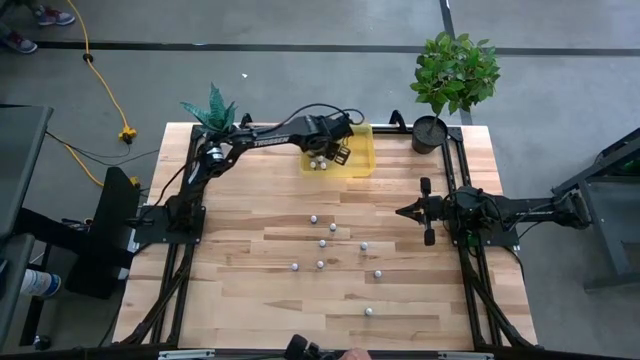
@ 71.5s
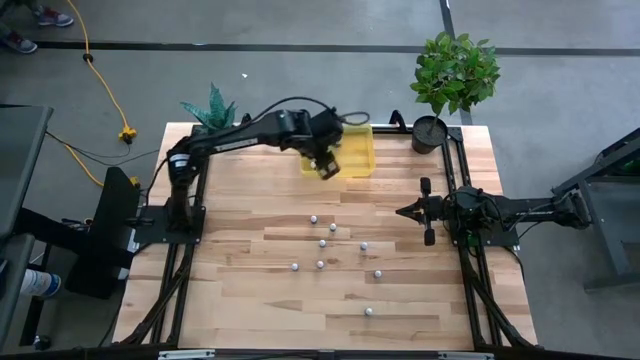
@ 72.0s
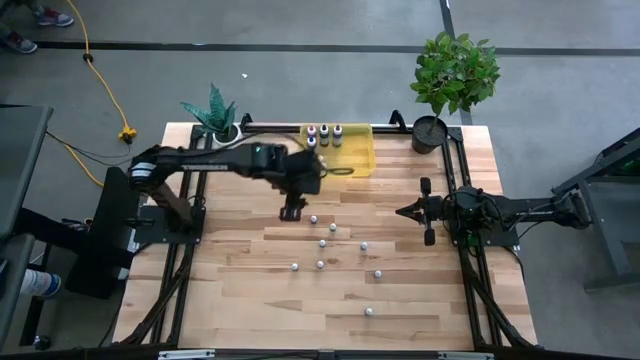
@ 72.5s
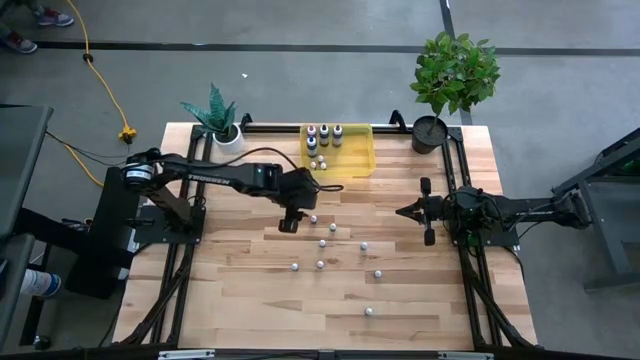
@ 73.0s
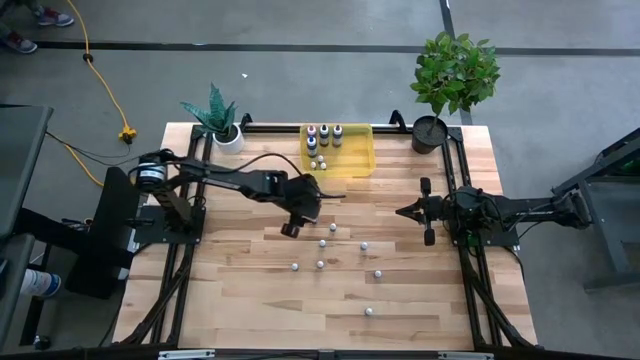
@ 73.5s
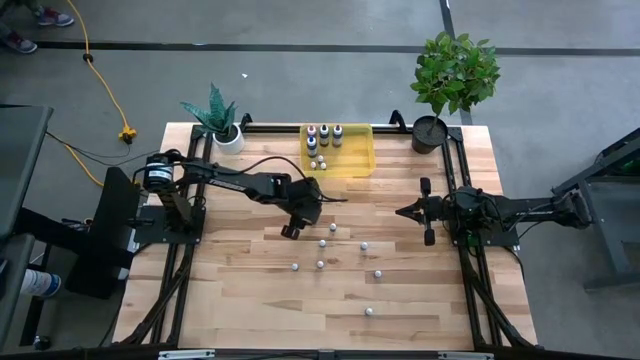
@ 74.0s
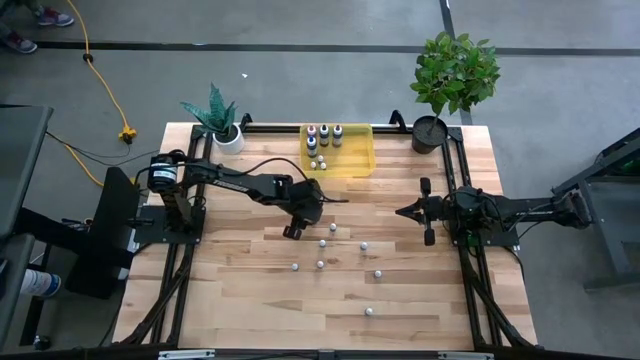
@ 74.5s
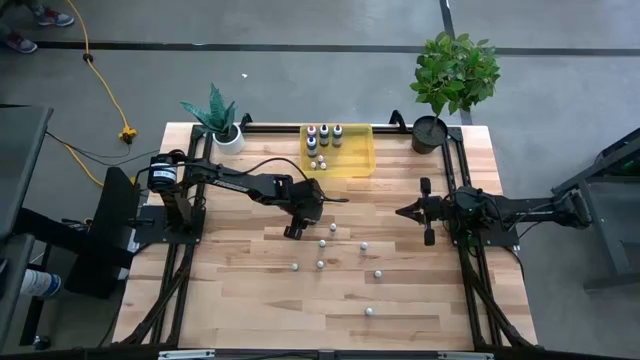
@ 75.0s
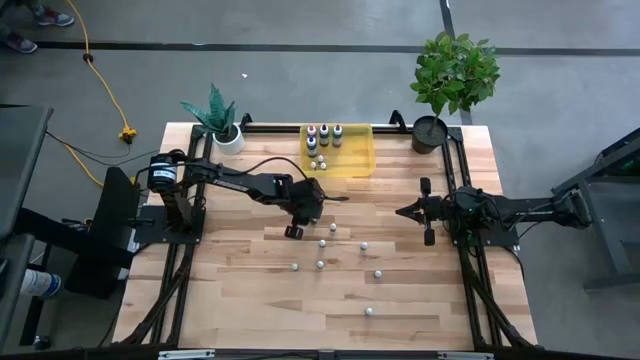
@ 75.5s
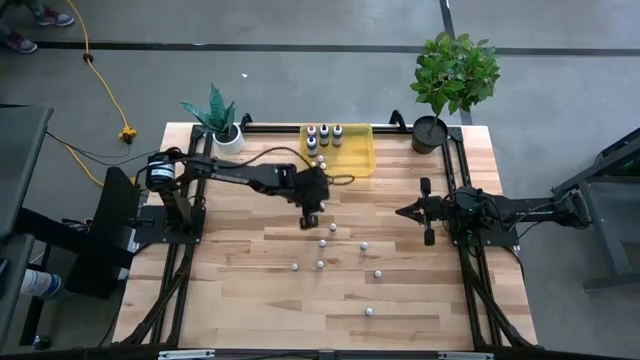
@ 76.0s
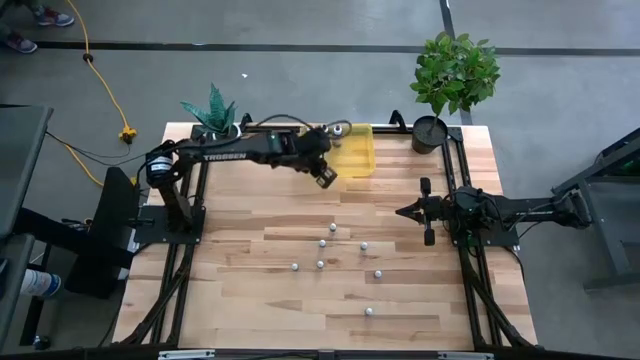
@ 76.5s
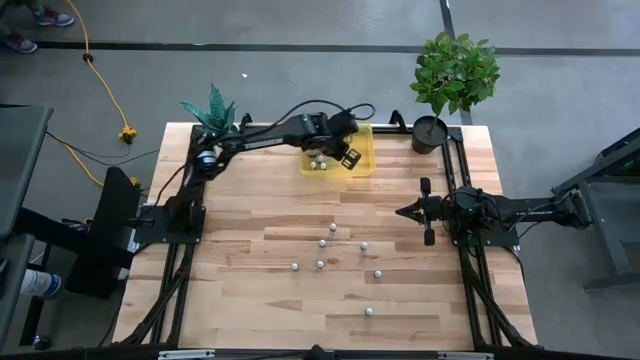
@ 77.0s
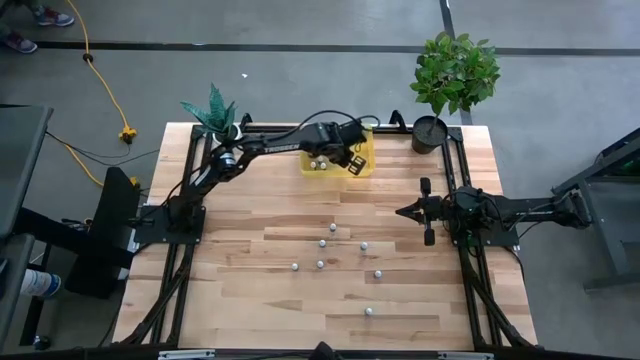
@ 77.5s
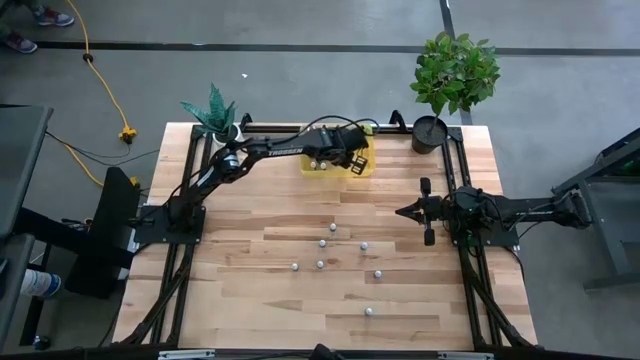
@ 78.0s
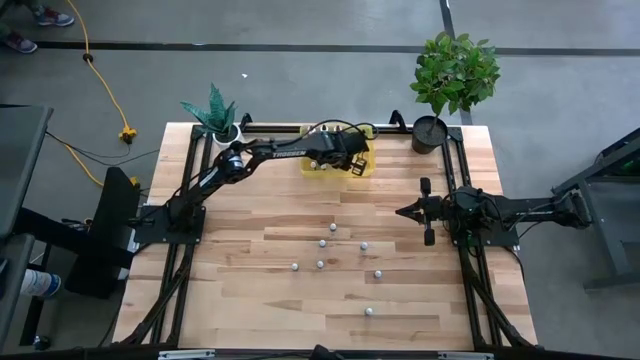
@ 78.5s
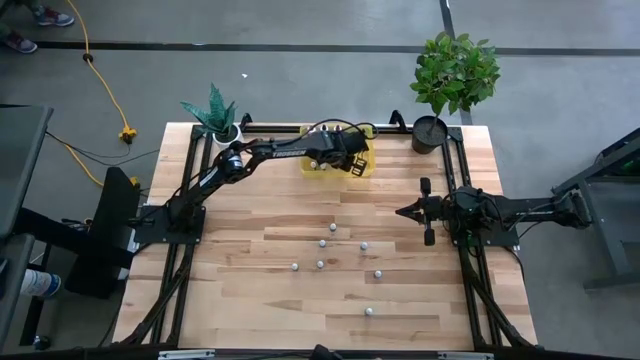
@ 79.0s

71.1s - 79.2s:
Task: Pick & Place food coloring
Put the top small red food coloring bottle into the yellow bin

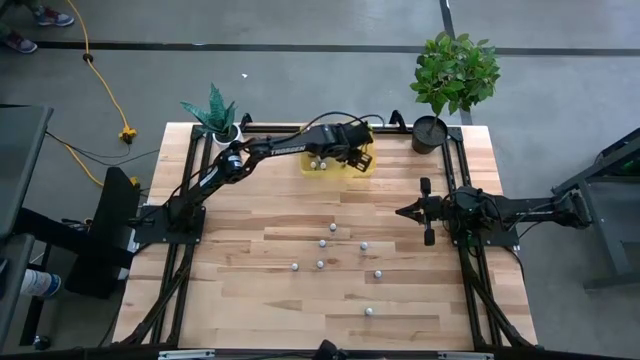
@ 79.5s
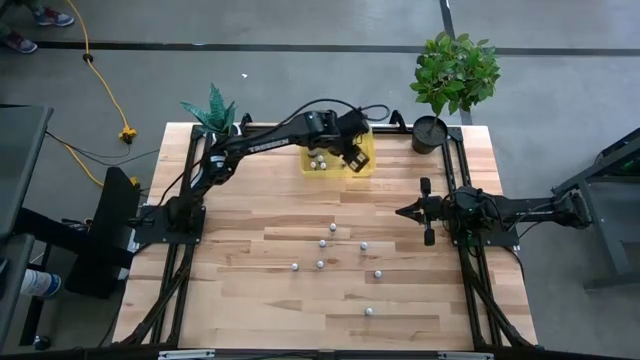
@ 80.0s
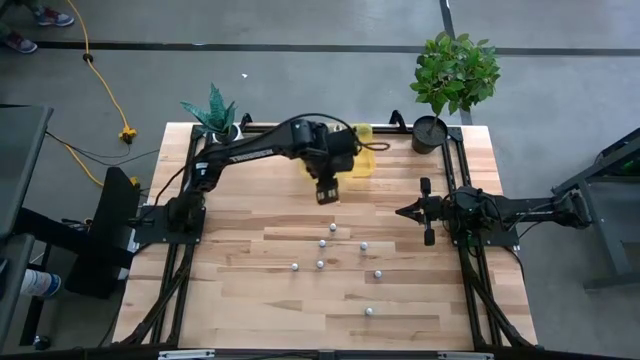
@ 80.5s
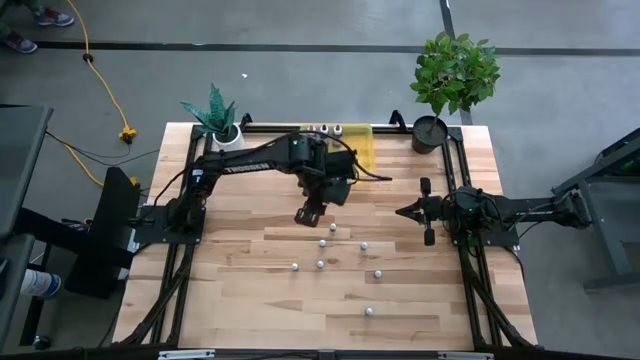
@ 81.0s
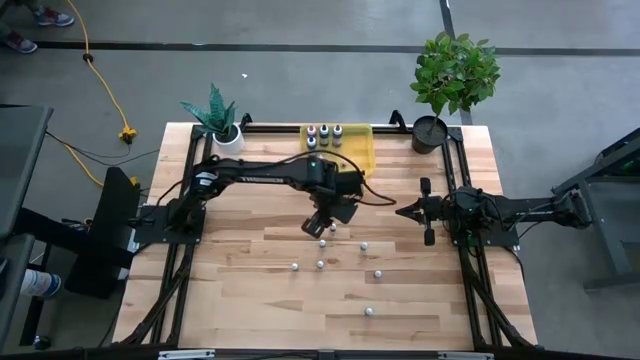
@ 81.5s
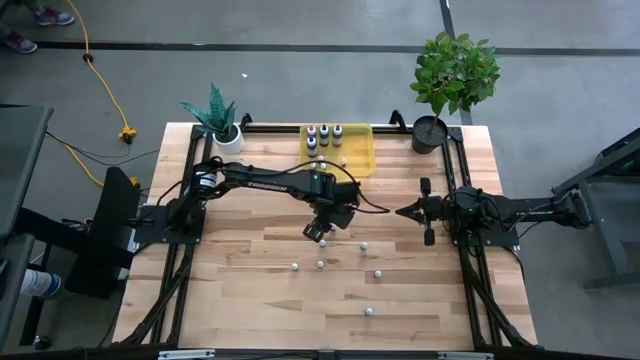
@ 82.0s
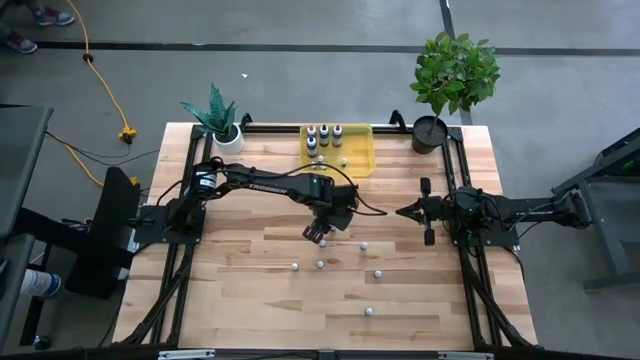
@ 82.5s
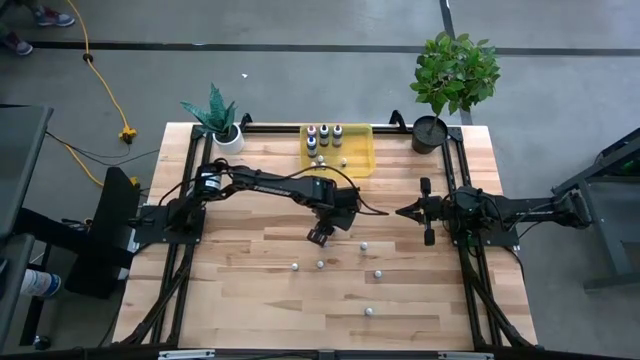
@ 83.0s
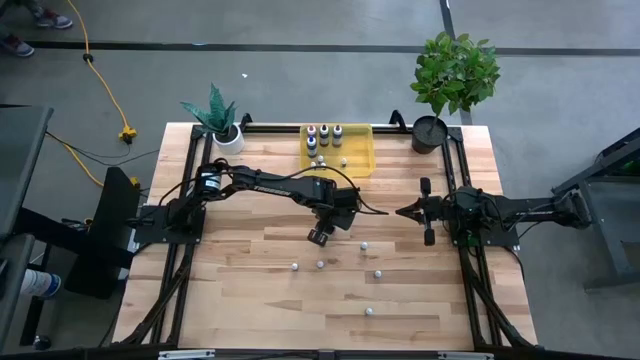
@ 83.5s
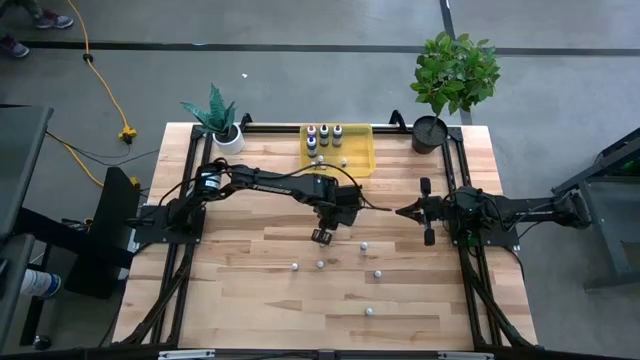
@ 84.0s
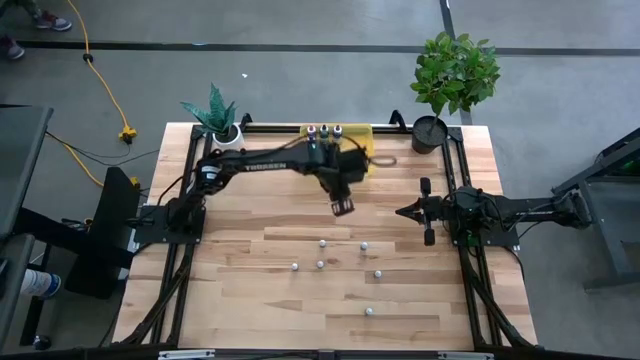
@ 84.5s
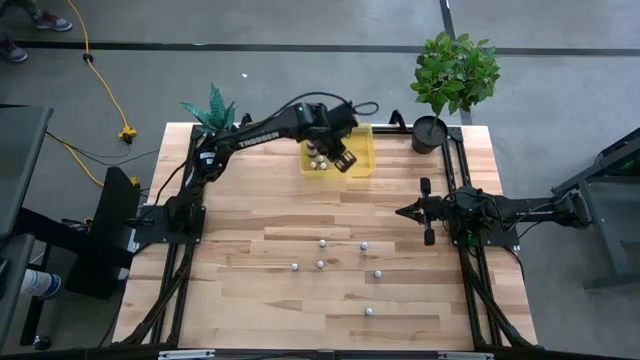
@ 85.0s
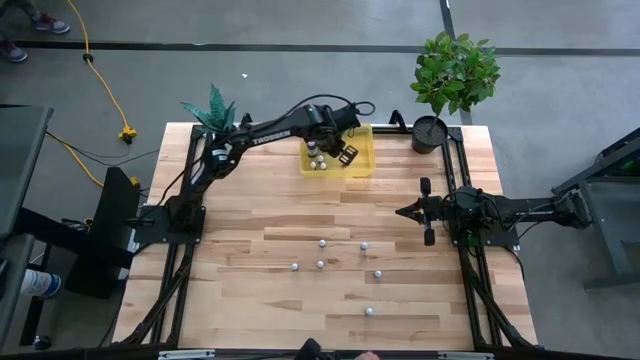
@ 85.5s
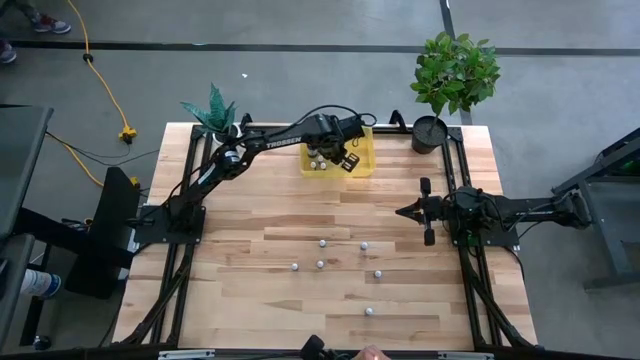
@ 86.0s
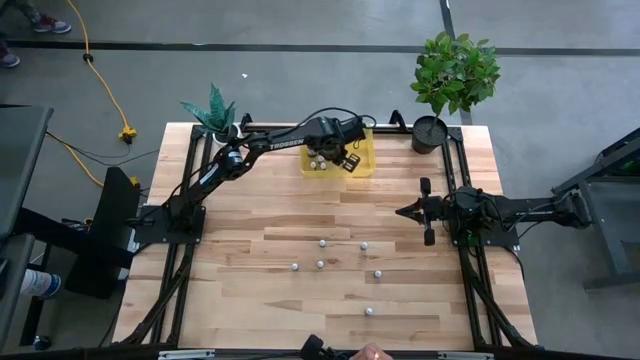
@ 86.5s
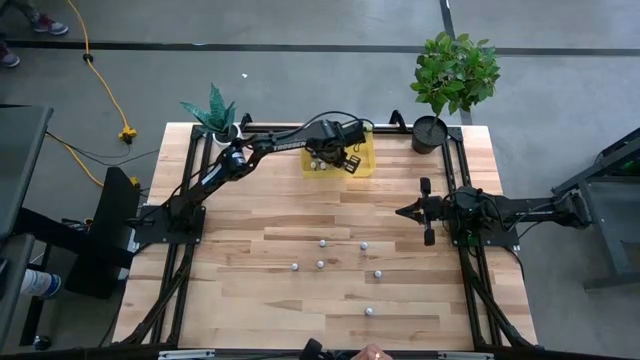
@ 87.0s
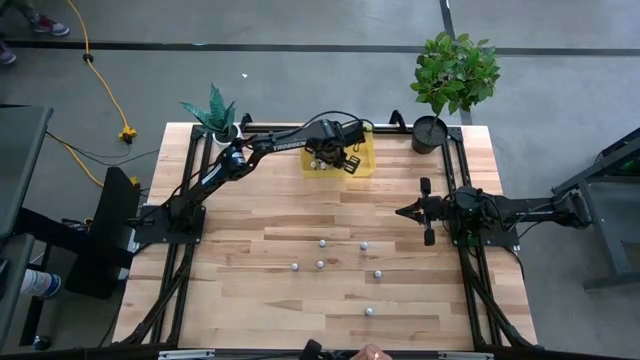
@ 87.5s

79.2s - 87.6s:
Put the small green food coloring bottle into the yellow bin

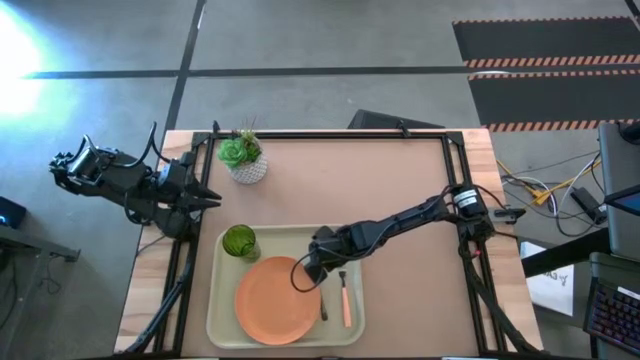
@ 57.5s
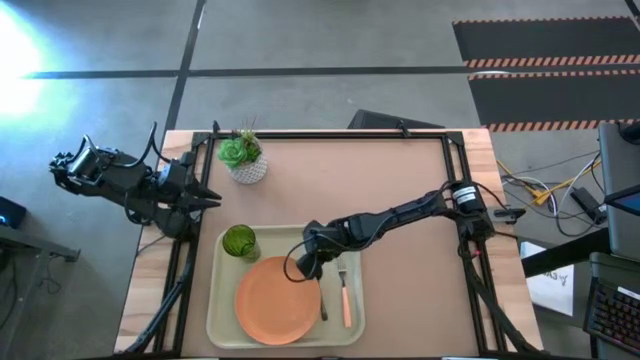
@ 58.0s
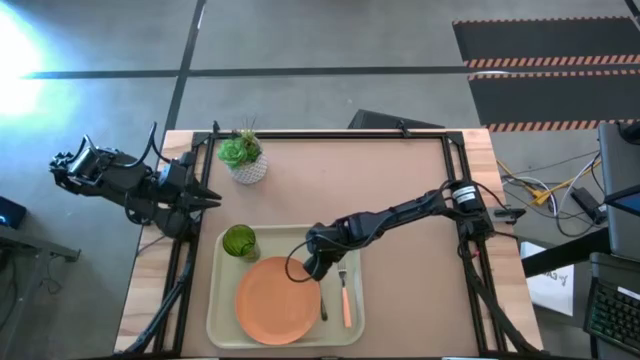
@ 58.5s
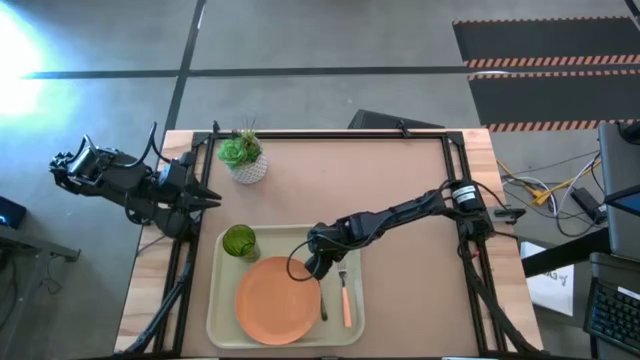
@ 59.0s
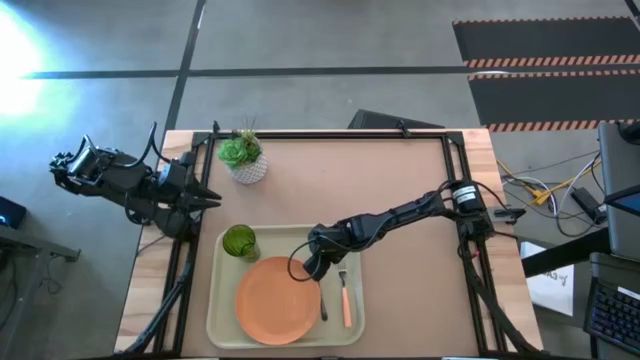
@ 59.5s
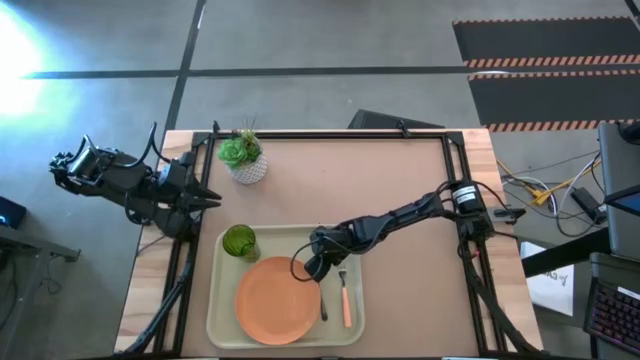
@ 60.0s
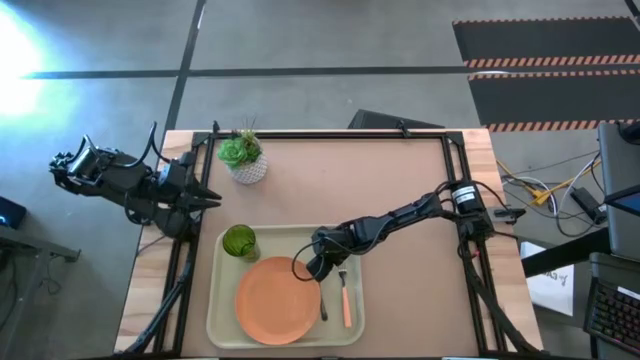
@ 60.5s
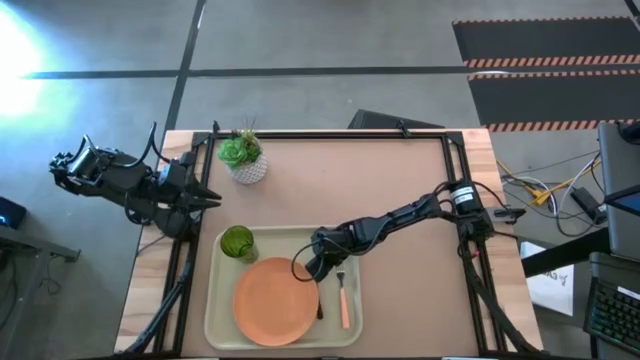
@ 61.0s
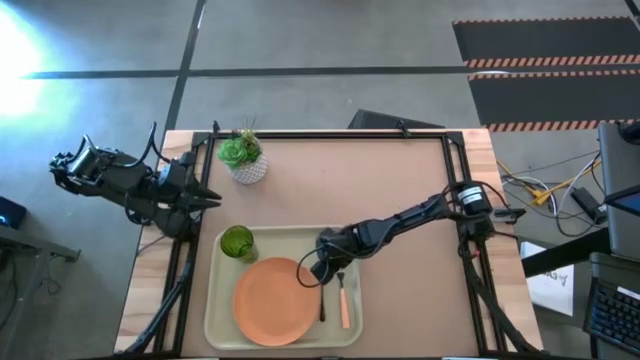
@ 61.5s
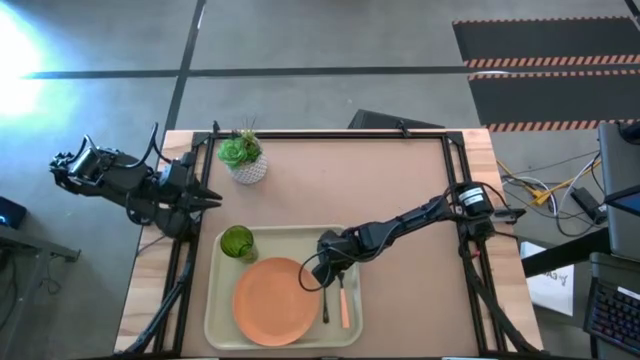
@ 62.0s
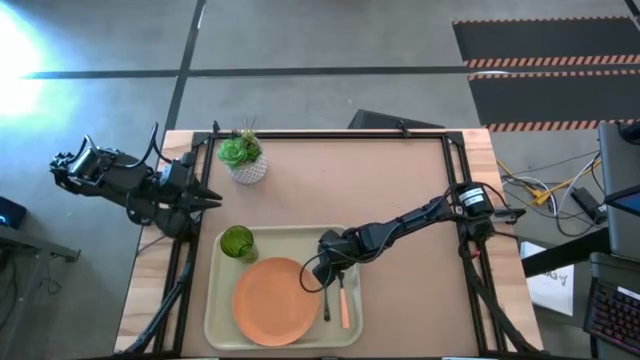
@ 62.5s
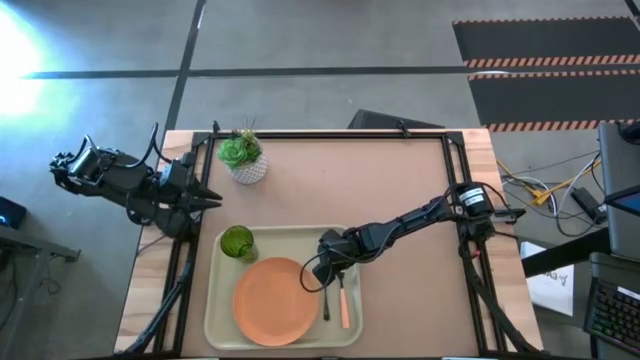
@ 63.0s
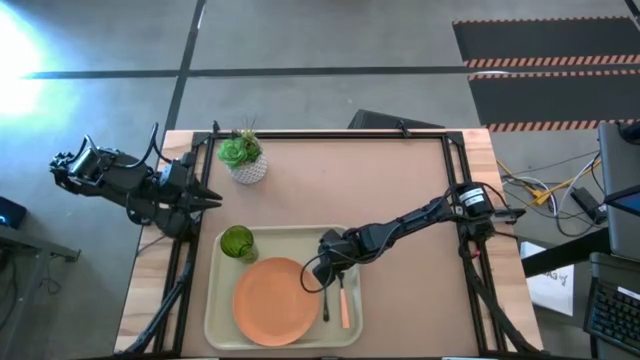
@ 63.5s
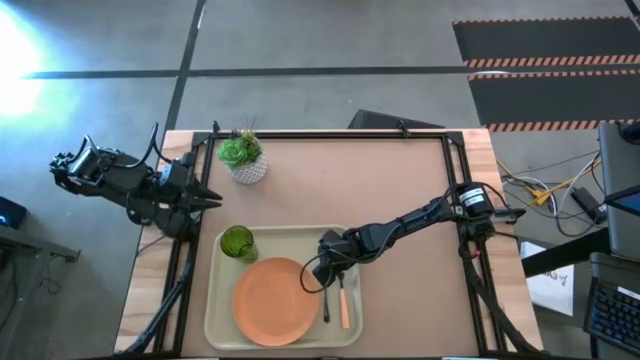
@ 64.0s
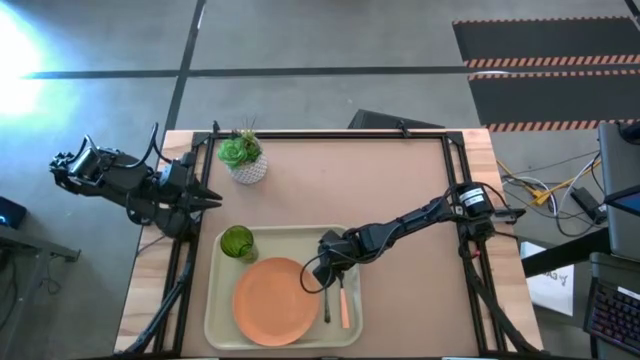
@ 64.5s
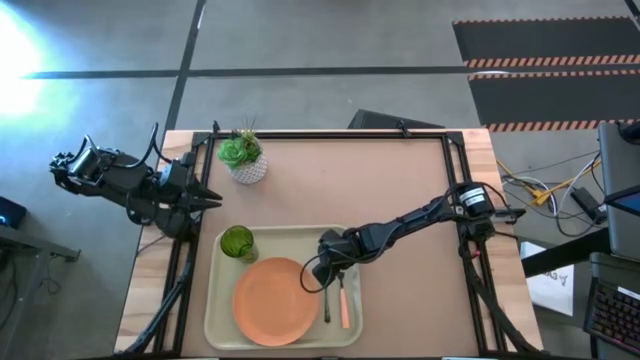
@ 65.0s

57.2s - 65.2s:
Task: Pick and place plate/cup/fork/spoon on tray
Adjust the black spoon on the white tray
